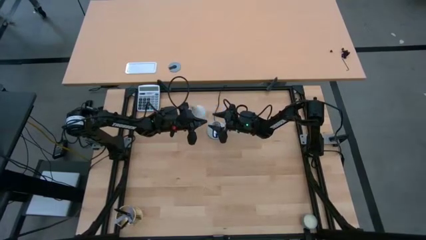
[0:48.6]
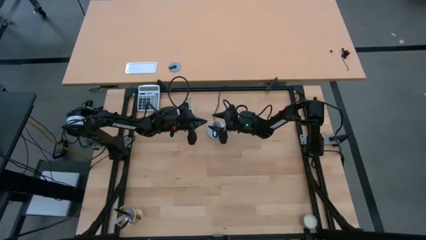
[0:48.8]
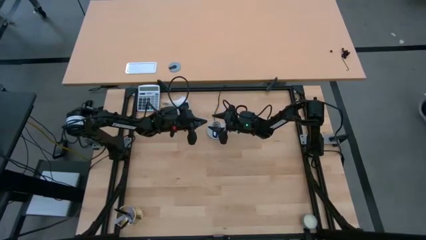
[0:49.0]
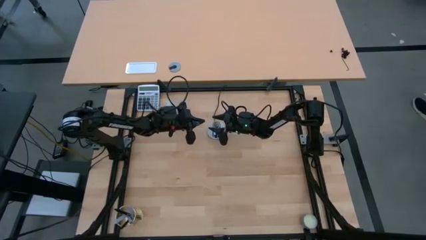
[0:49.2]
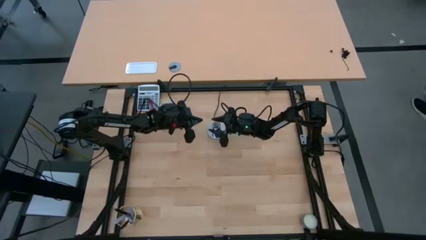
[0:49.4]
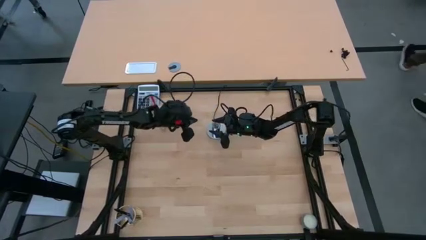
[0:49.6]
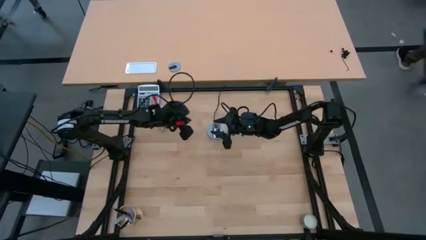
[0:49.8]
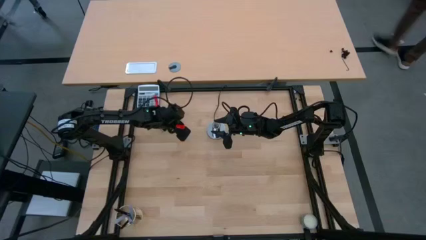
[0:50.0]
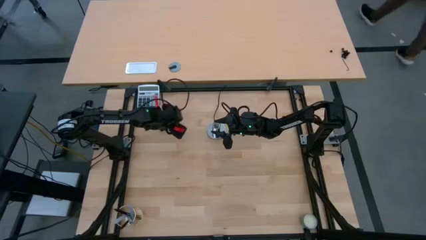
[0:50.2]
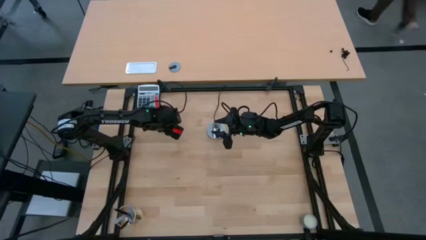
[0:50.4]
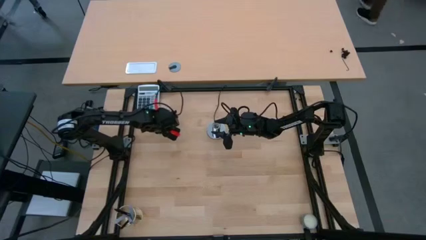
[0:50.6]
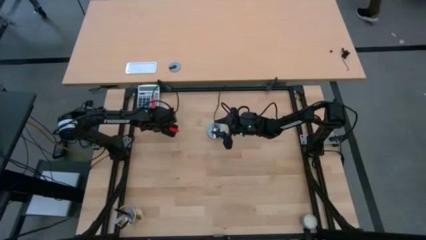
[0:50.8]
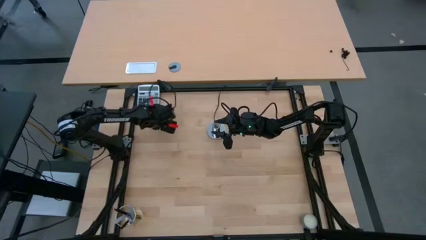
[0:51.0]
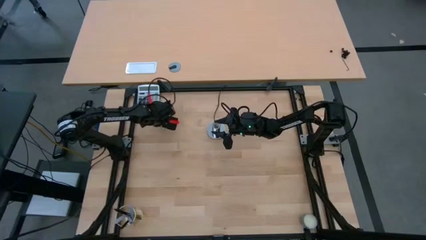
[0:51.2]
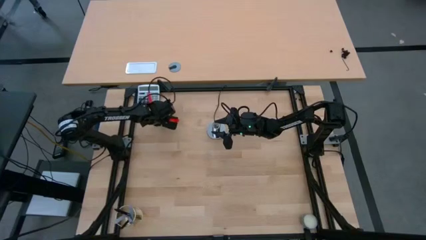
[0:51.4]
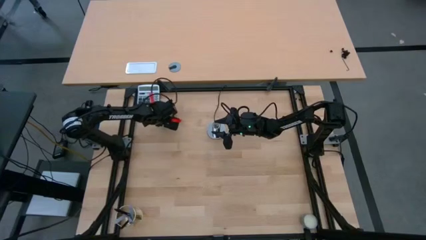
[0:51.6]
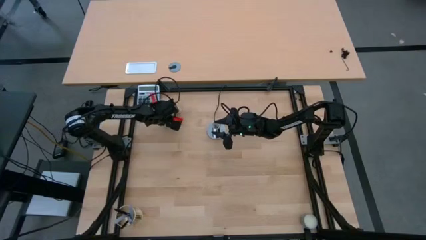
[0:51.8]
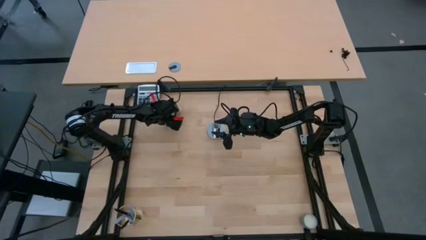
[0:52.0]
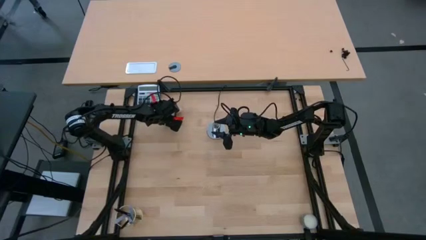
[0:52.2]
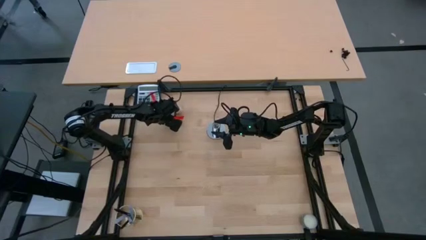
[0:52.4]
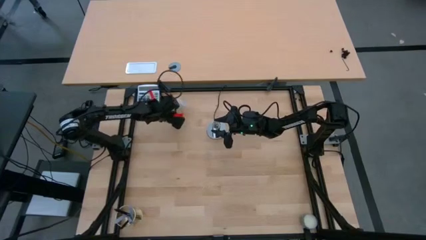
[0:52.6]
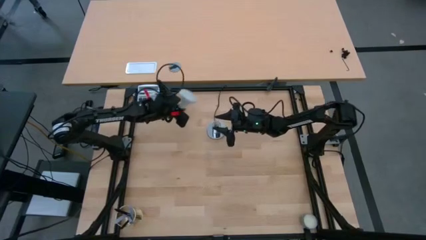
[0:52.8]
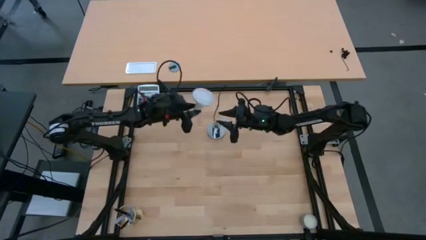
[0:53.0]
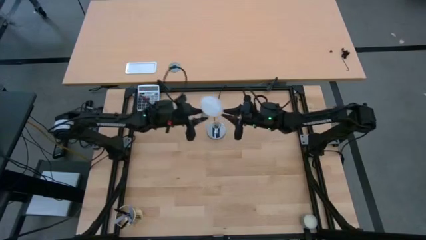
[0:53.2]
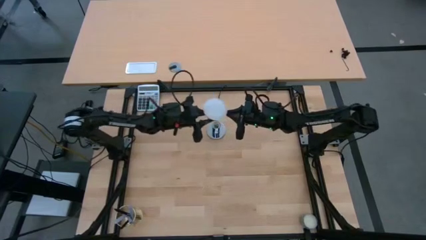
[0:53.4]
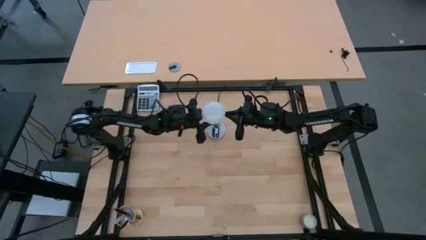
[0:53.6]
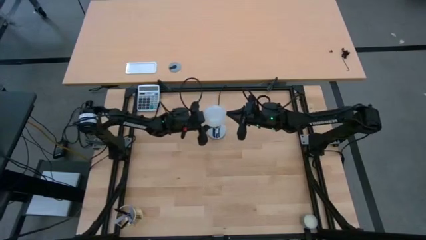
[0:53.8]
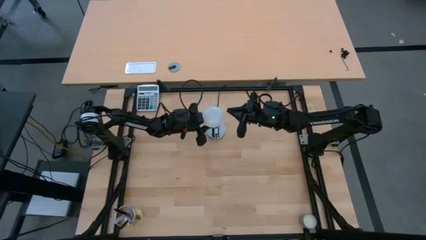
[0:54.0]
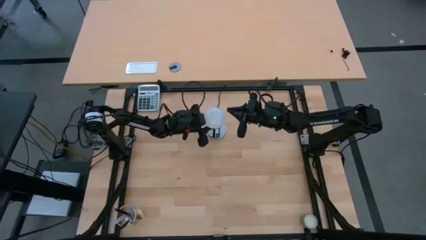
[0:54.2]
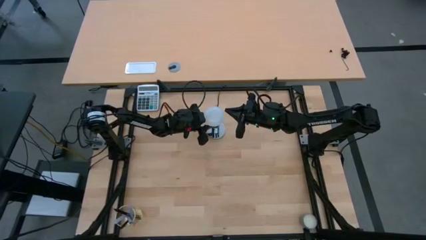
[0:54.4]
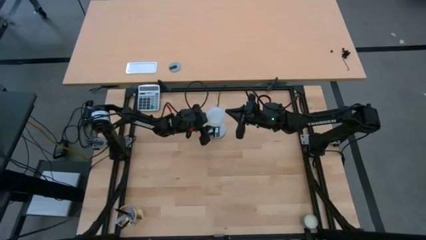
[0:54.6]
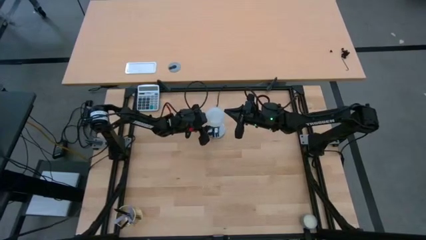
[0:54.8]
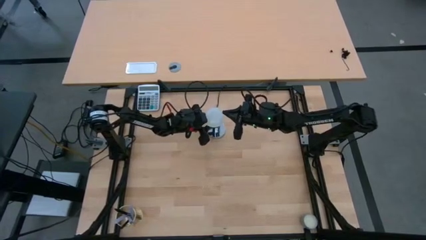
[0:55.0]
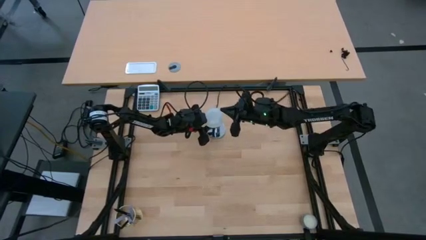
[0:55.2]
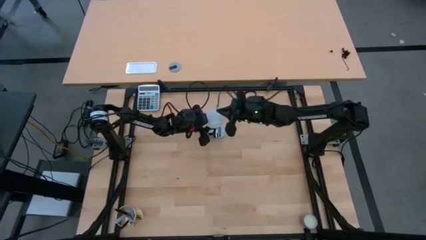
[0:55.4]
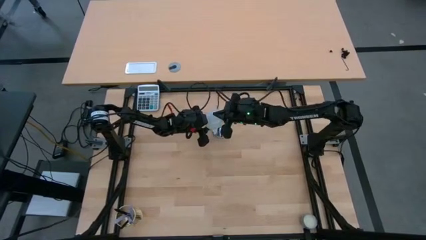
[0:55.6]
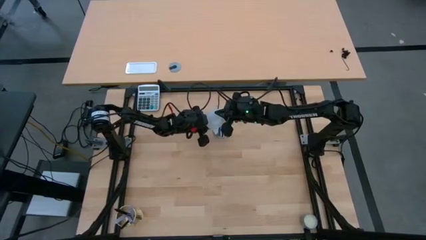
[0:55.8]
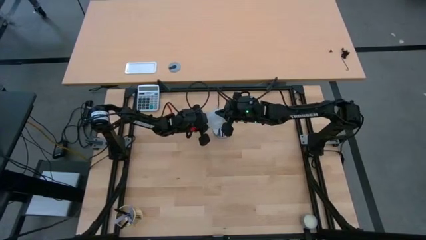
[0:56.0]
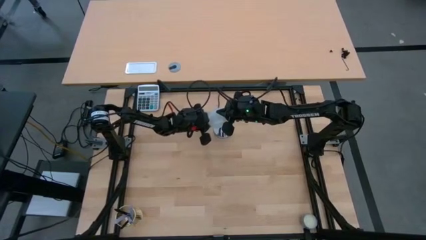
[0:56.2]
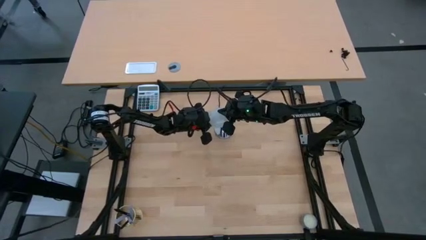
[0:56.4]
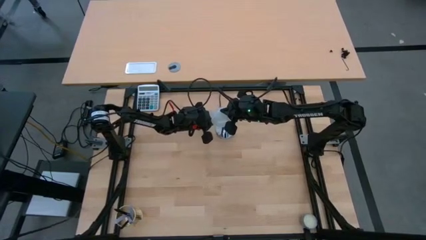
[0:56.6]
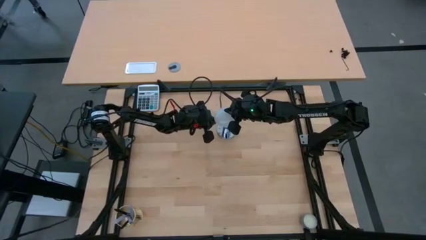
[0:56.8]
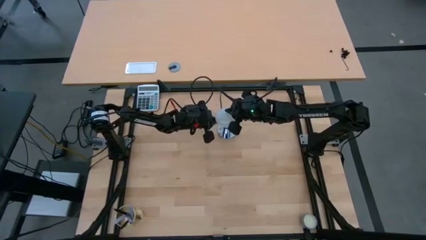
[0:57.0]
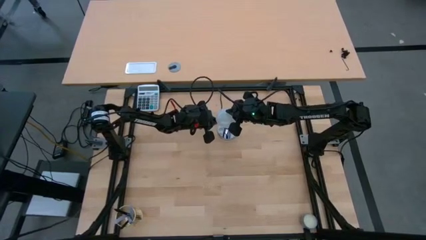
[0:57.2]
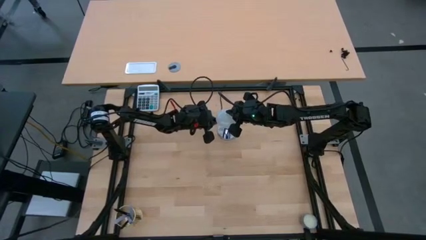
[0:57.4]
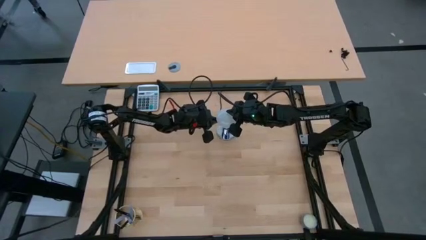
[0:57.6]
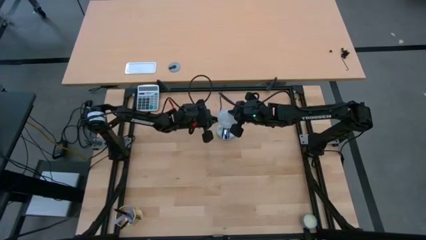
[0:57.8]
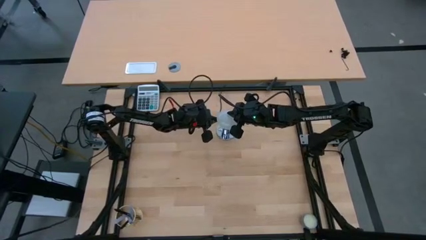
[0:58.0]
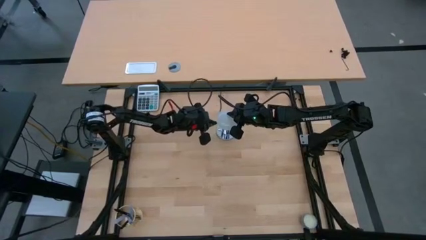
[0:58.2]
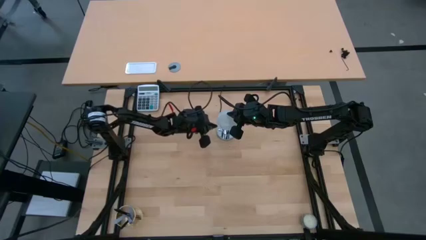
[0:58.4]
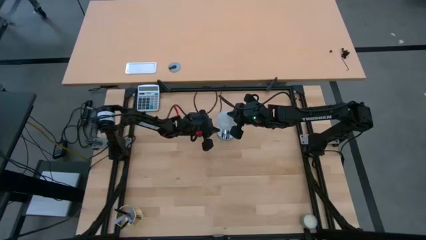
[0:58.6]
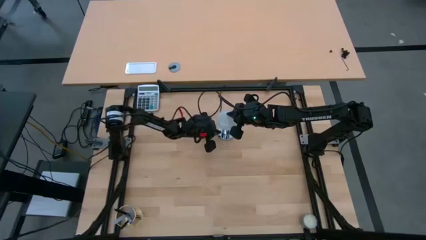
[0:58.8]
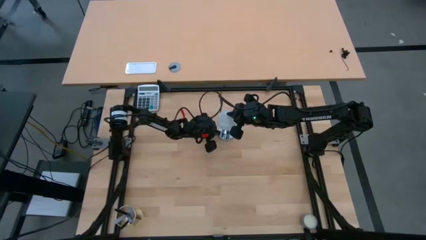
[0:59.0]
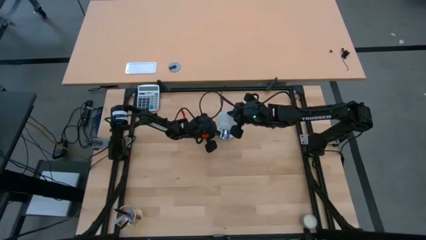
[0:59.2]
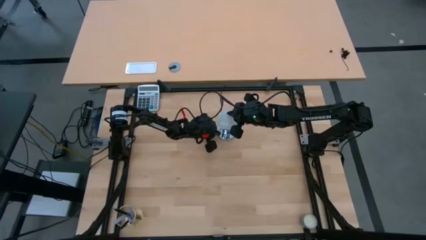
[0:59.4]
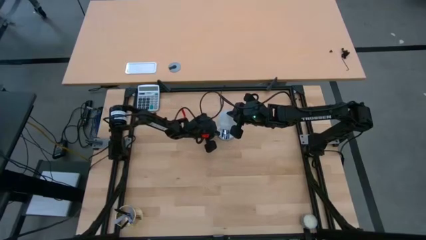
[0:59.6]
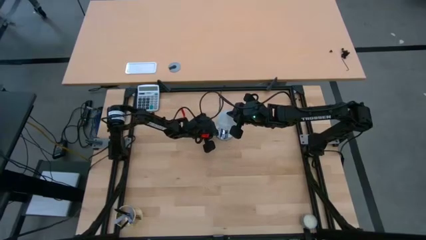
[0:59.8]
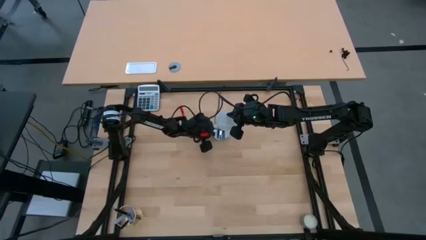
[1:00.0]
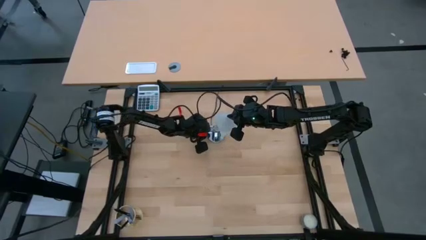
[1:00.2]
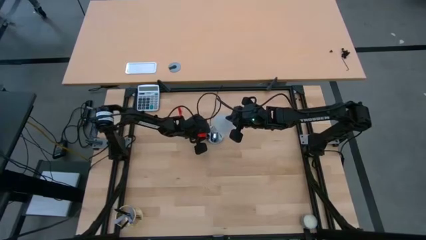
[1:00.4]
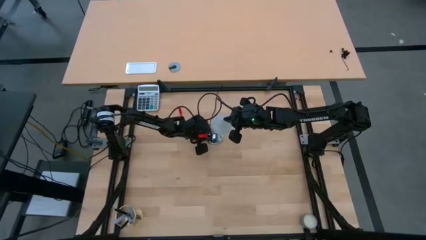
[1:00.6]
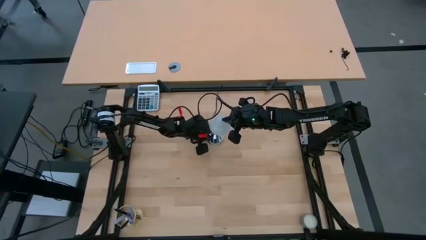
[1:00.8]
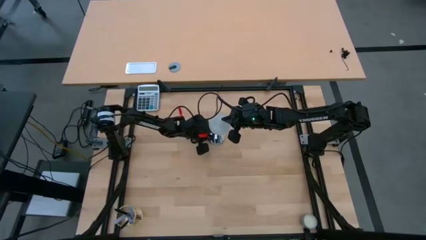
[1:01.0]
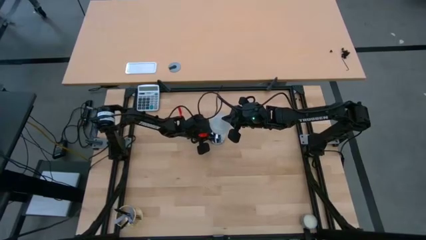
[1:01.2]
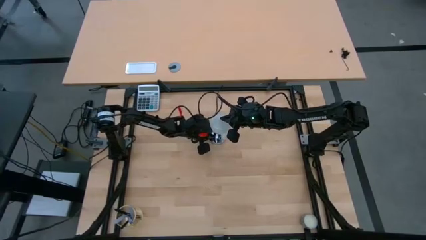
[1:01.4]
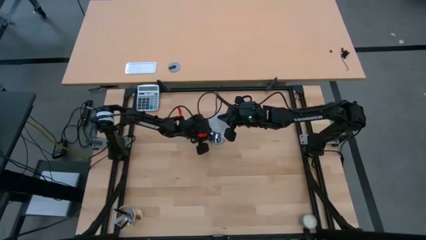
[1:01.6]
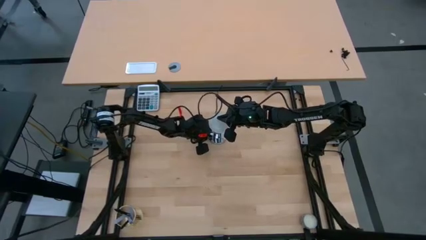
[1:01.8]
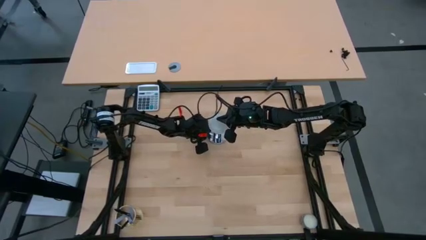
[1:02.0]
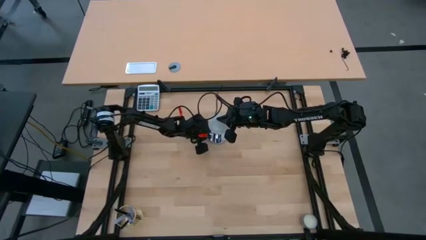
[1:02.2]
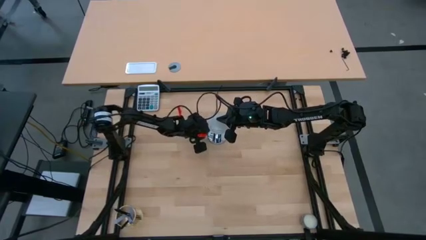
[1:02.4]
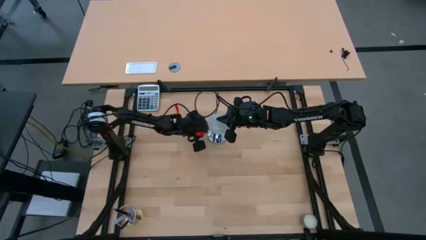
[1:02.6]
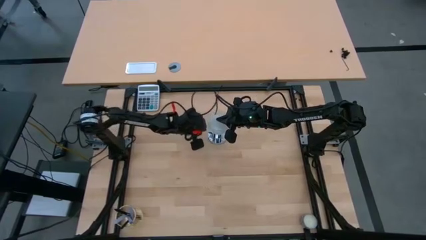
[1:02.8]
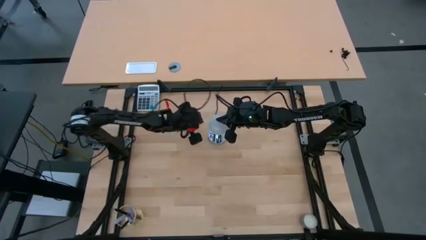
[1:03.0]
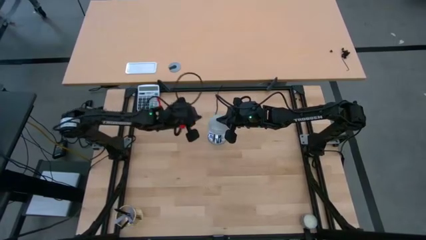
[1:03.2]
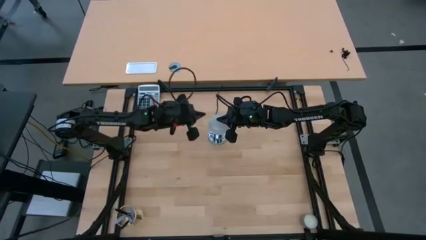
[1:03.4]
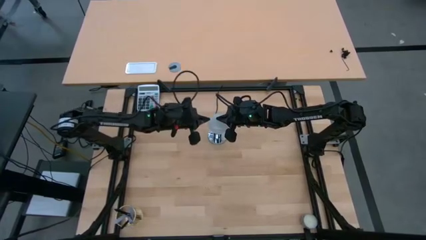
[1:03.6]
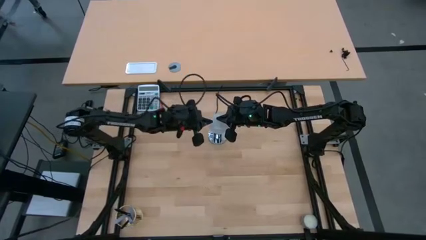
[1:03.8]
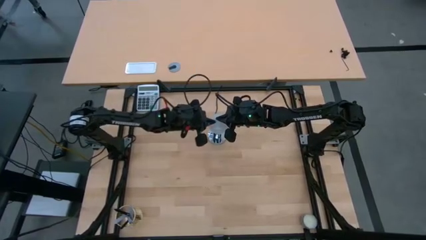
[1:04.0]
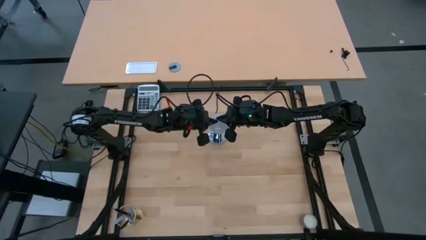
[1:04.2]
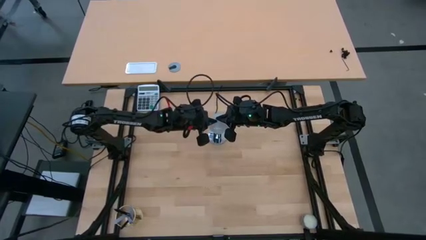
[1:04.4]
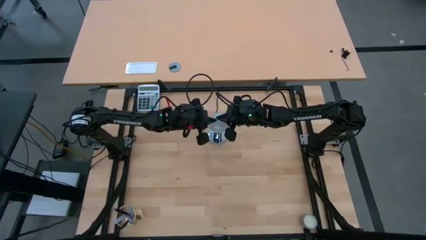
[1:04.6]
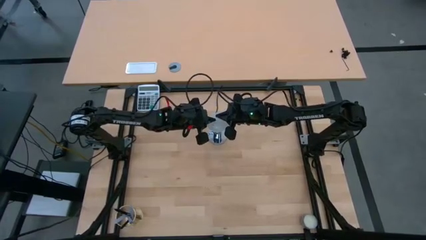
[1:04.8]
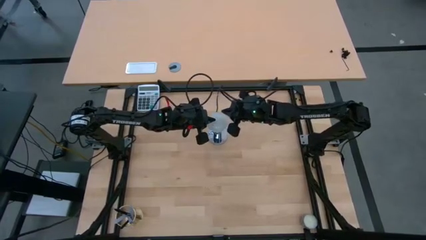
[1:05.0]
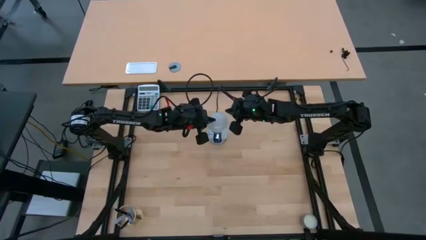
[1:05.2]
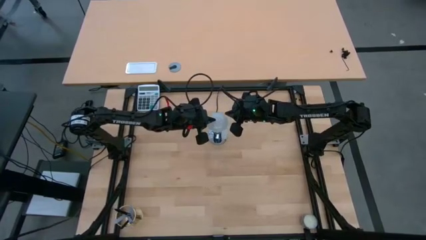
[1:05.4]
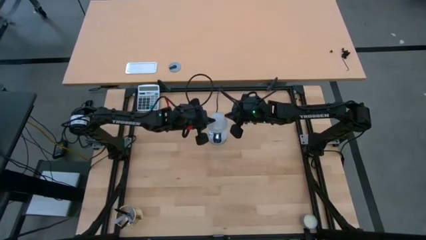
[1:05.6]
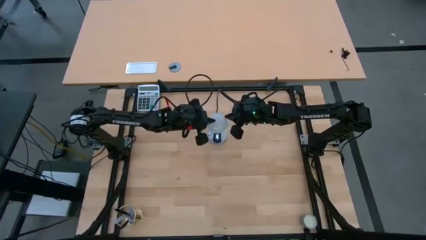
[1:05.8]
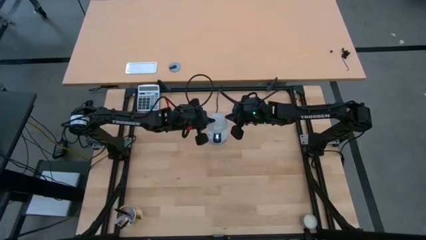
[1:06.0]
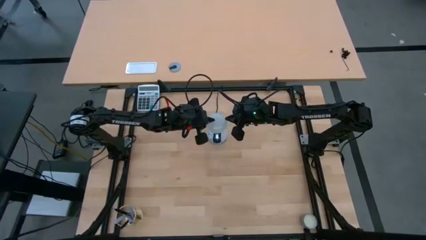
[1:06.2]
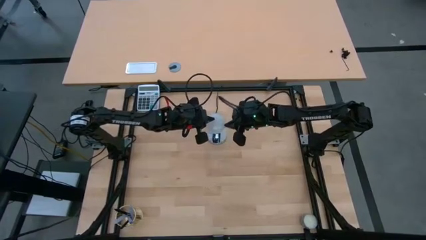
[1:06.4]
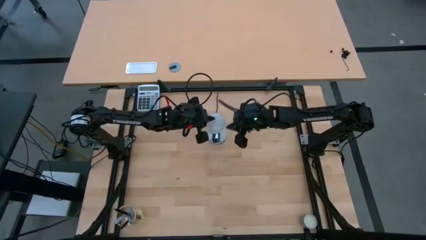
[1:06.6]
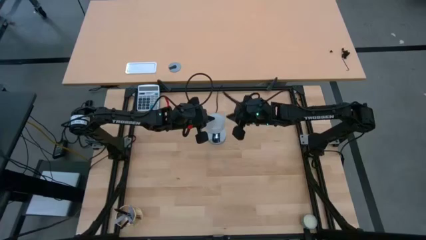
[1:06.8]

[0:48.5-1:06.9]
Task: Screw lightbulb
Insert the lightbulb into the lamp
